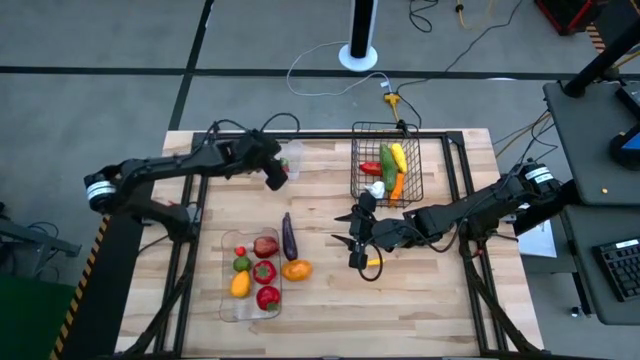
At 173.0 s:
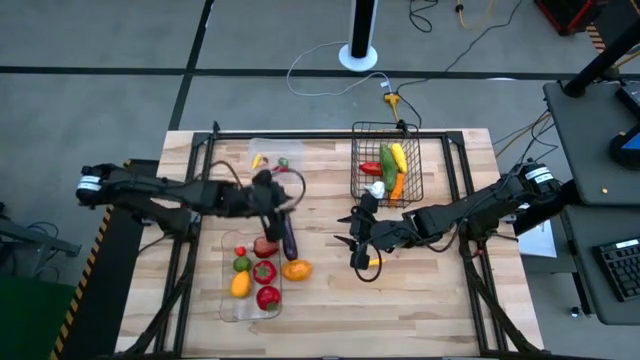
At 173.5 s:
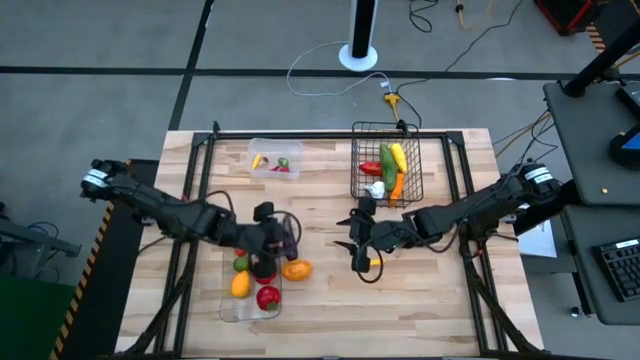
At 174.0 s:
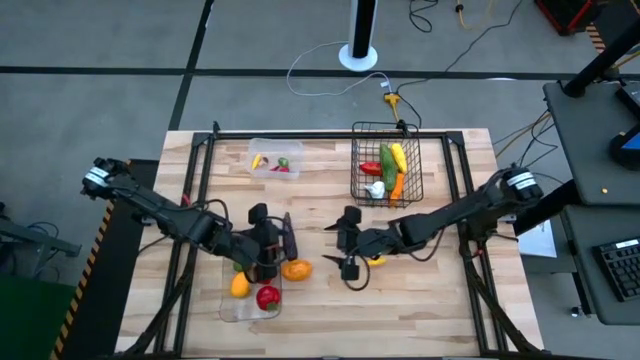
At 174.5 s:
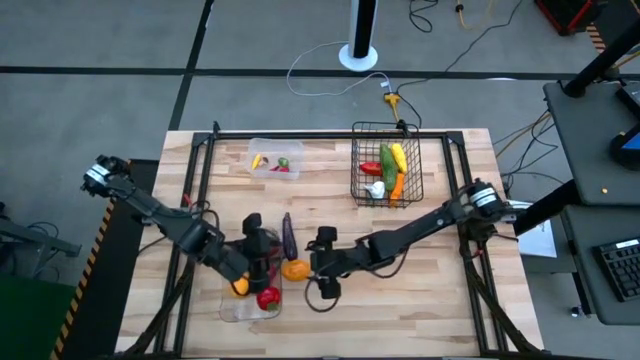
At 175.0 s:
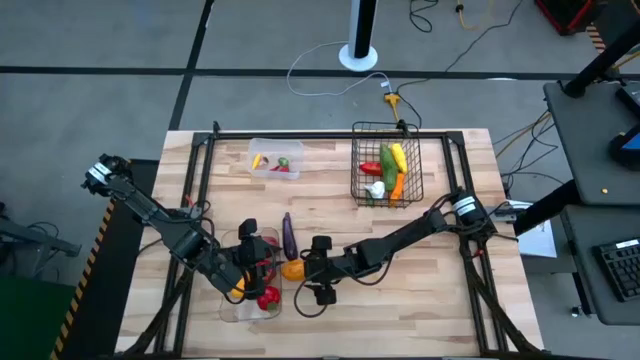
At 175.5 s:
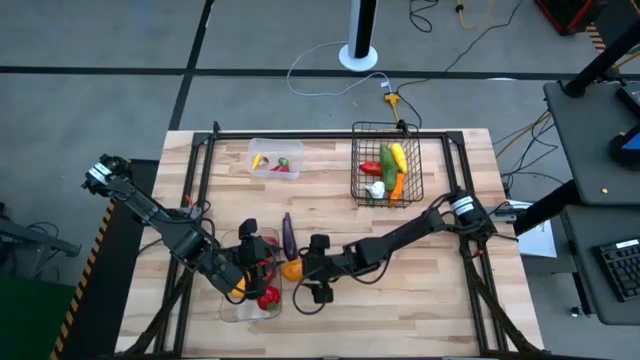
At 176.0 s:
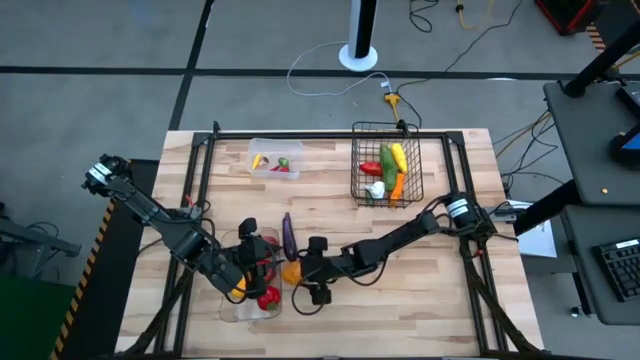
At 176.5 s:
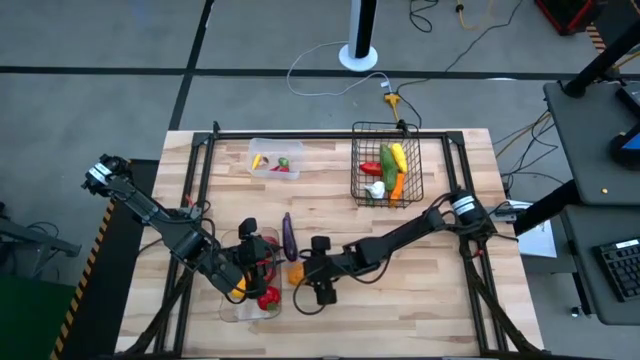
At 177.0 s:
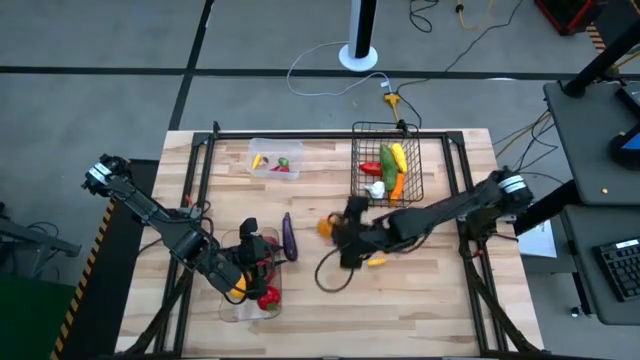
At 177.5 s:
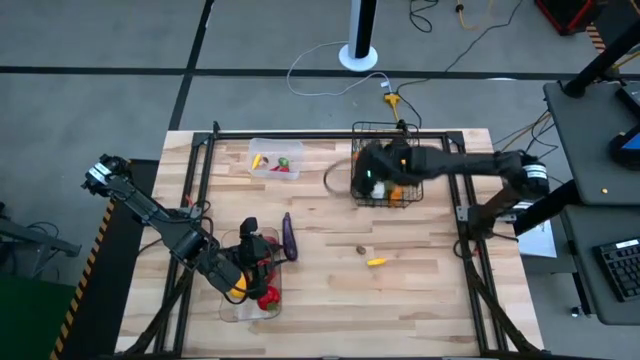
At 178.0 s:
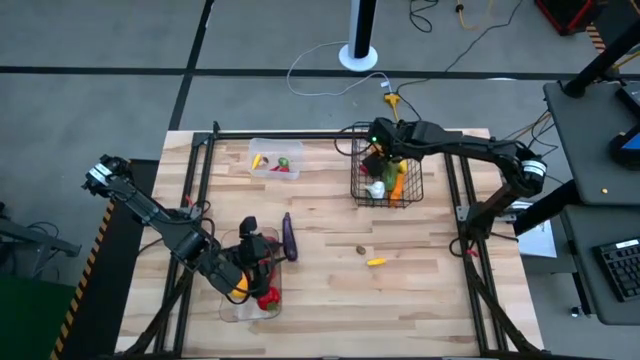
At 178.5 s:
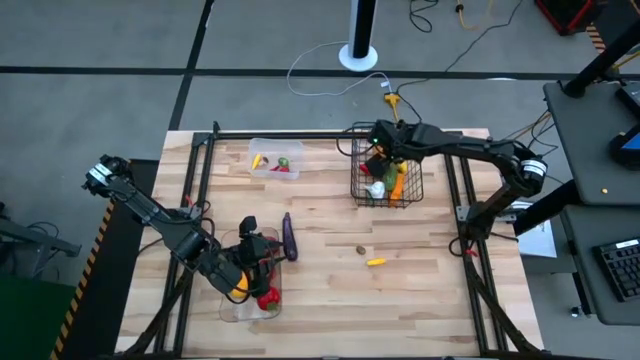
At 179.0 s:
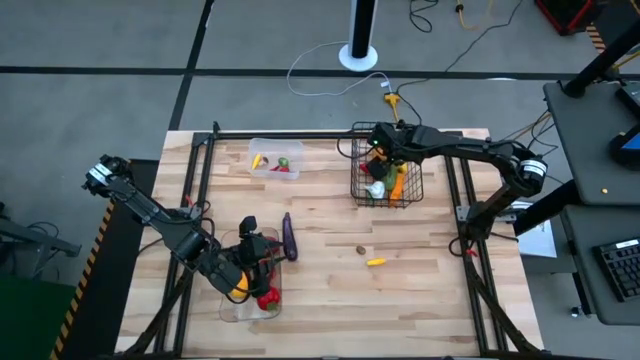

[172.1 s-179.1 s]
Task: Sort produce into baskets
Put the potato into the wire basket

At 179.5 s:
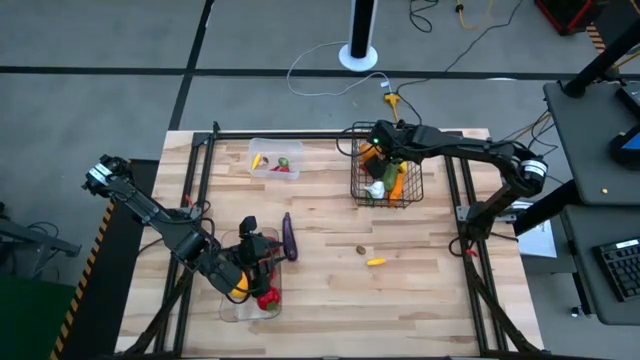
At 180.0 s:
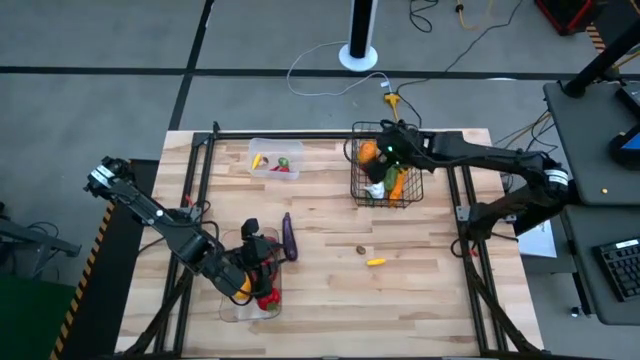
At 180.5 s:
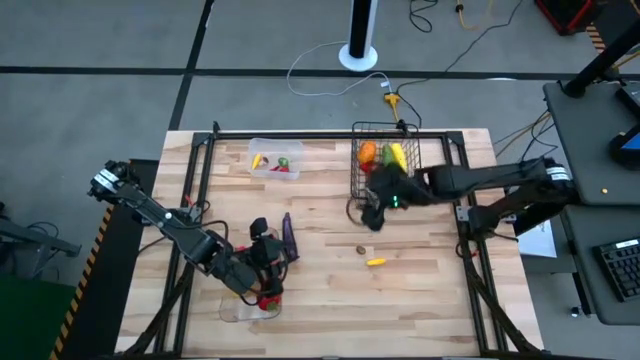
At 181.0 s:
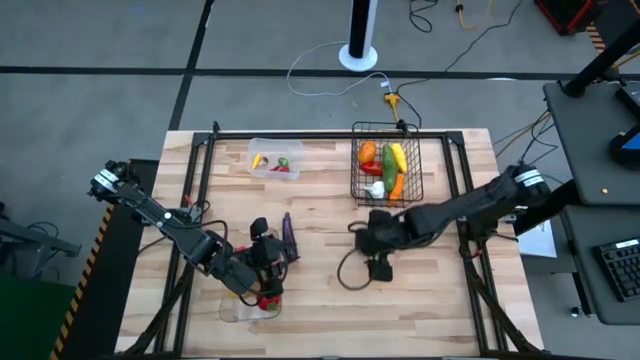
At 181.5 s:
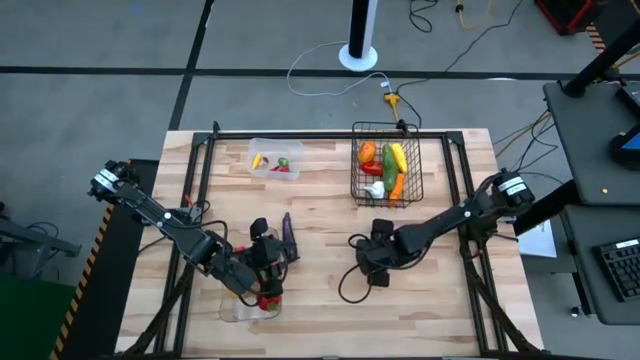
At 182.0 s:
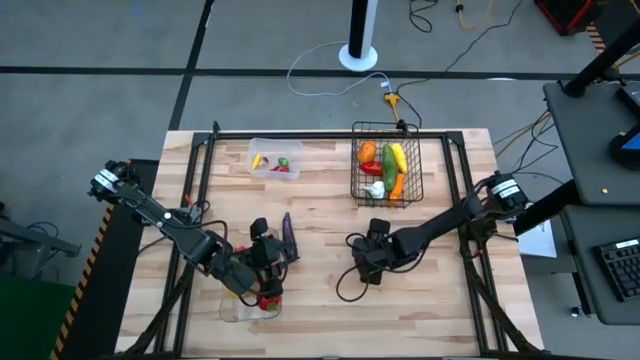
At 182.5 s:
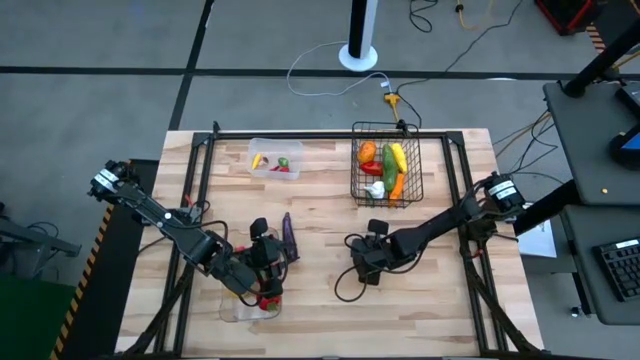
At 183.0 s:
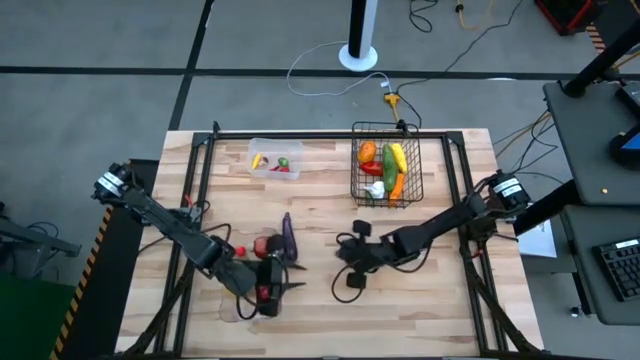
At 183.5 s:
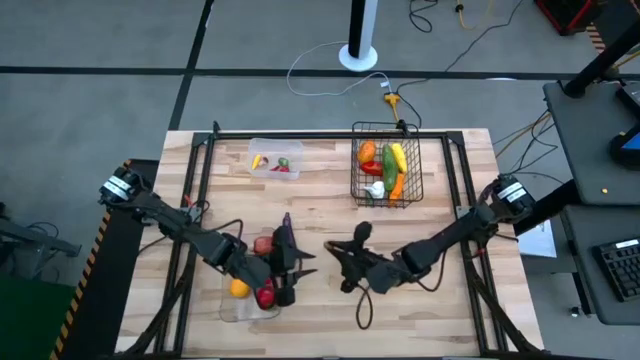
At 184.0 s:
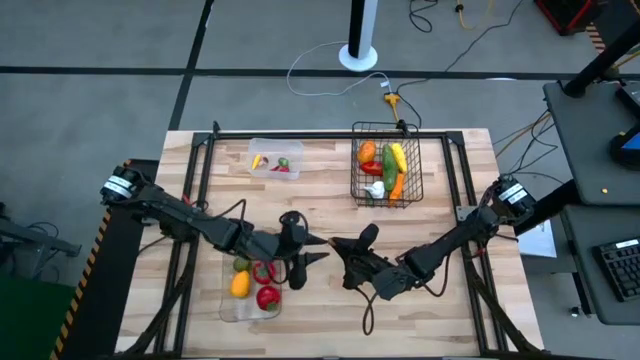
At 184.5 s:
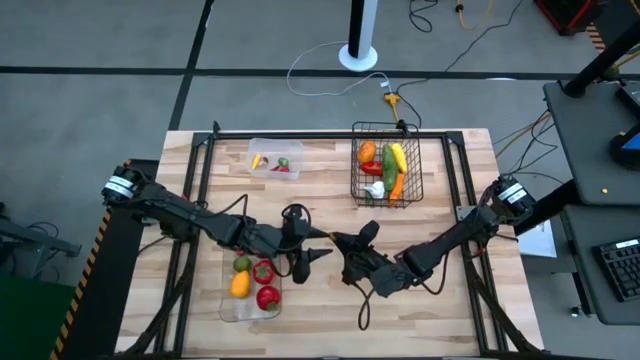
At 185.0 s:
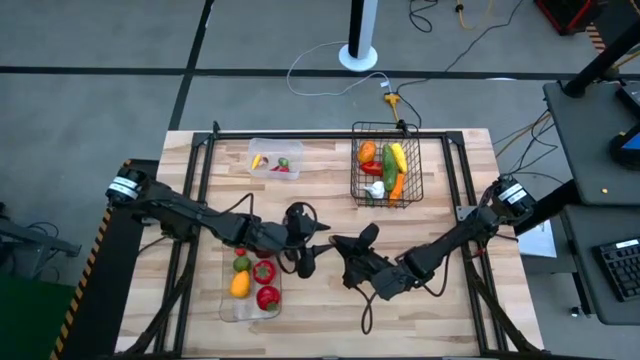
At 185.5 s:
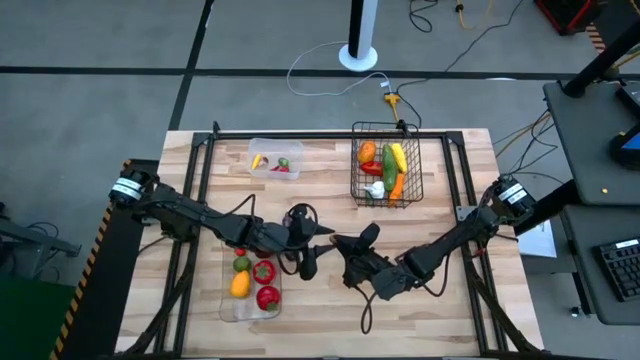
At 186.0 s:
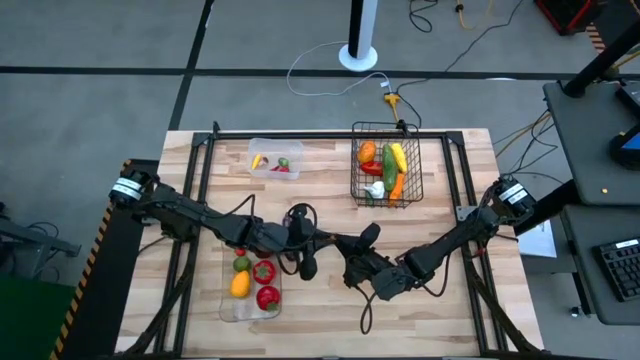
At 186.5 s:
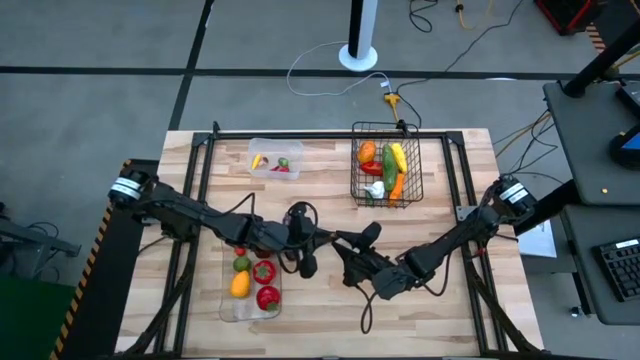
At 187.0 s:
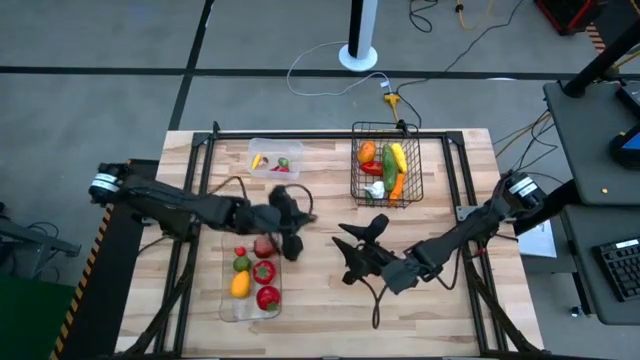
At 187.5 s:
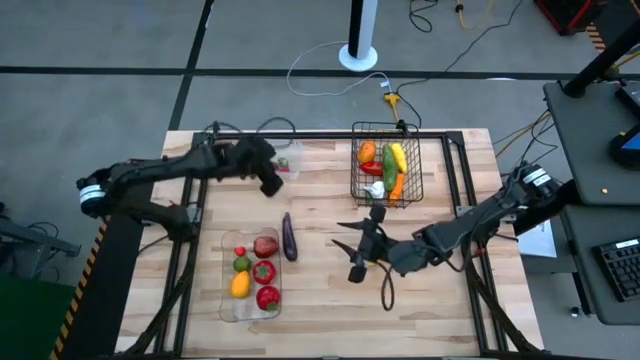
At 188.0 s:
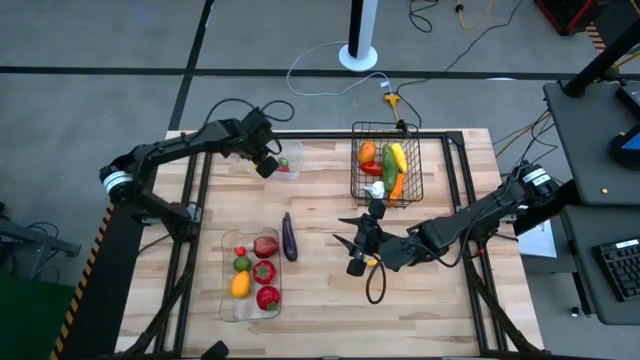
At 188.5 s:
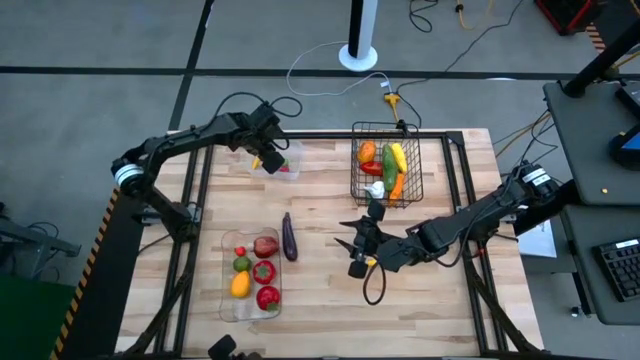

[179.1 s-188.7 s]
Put the date into the wire basket

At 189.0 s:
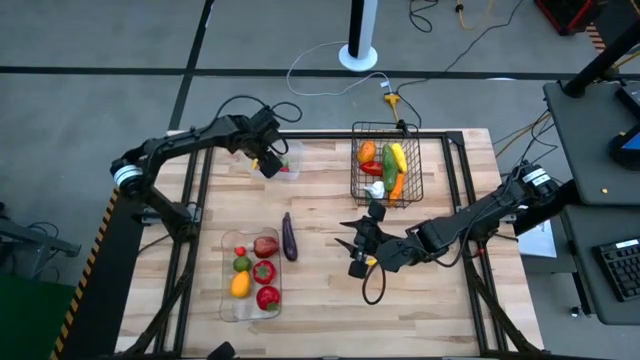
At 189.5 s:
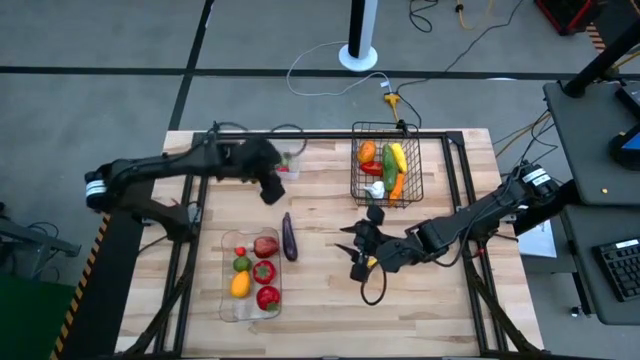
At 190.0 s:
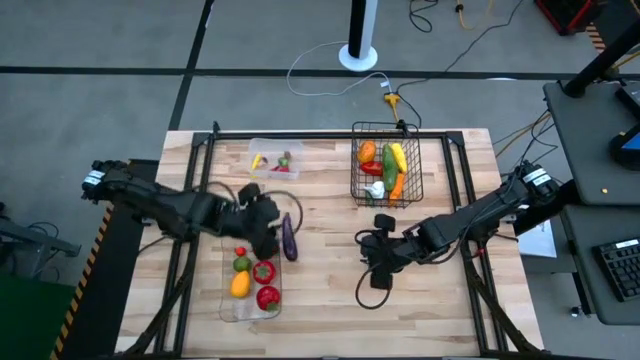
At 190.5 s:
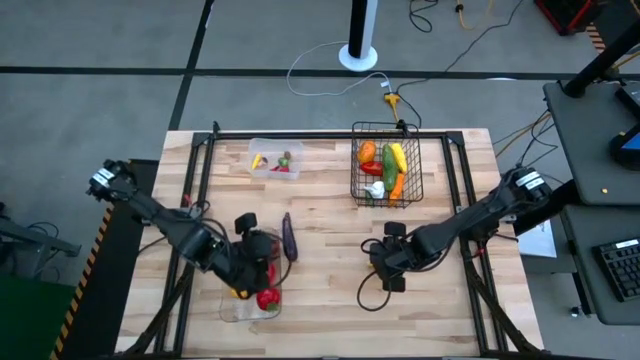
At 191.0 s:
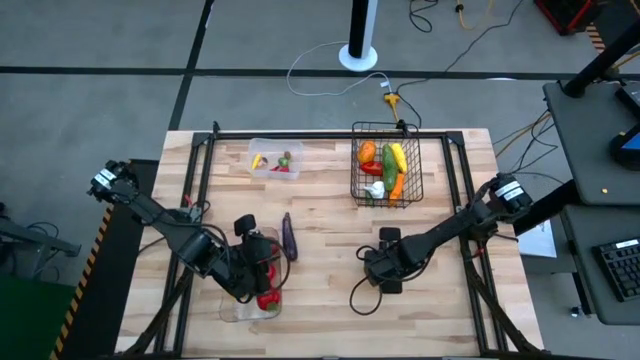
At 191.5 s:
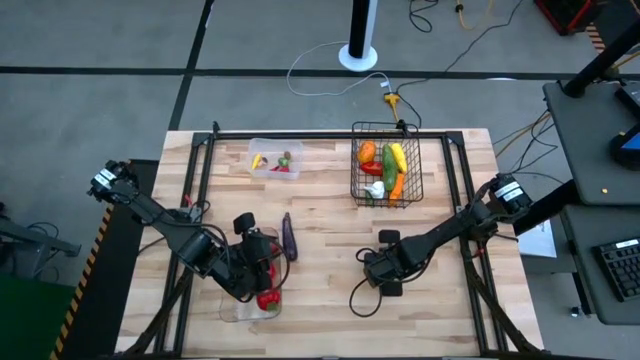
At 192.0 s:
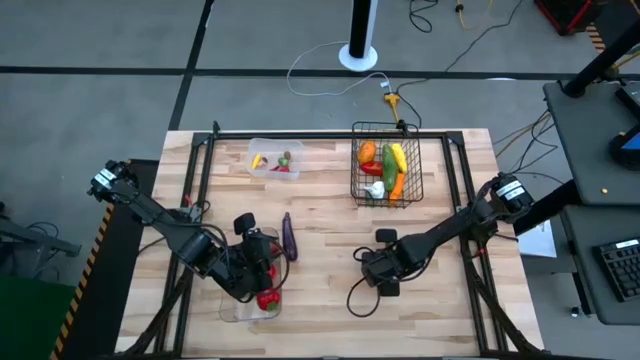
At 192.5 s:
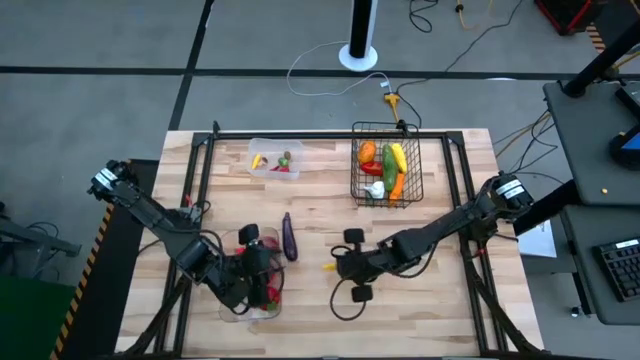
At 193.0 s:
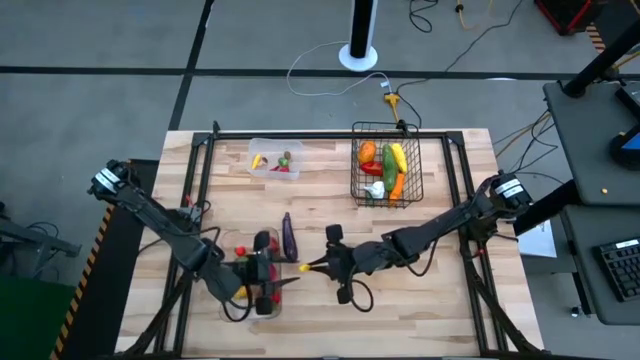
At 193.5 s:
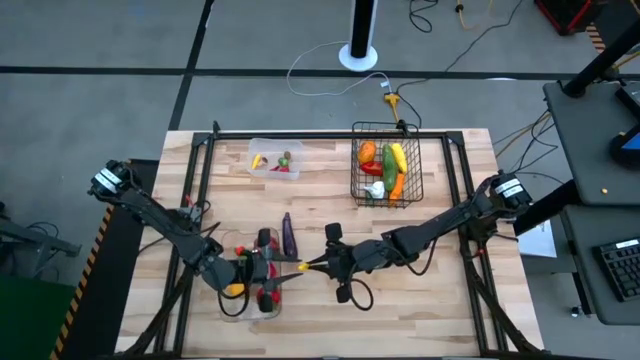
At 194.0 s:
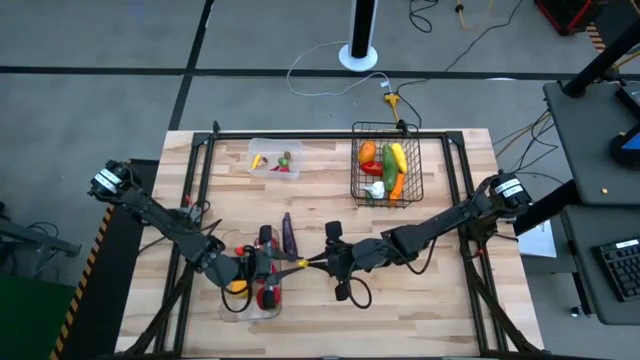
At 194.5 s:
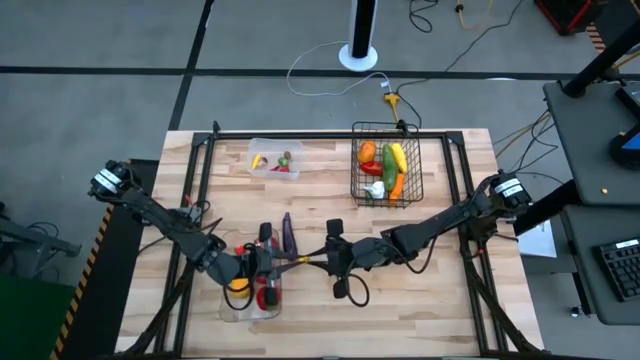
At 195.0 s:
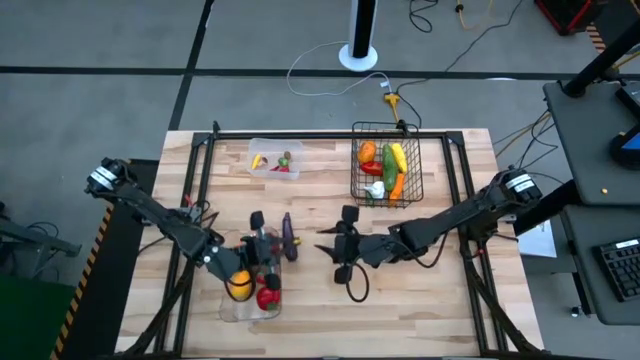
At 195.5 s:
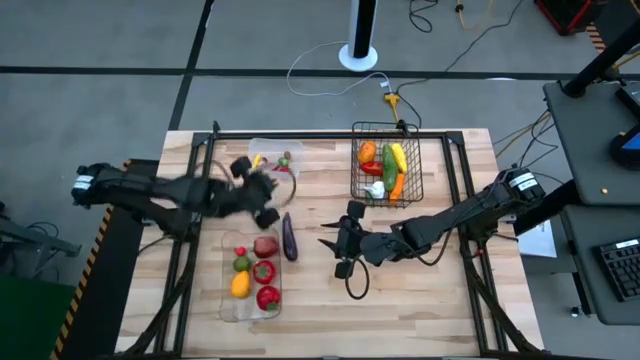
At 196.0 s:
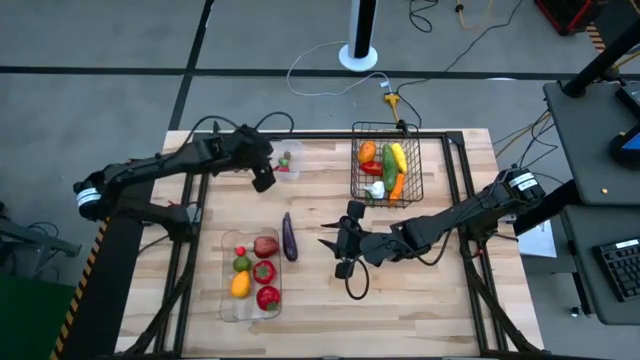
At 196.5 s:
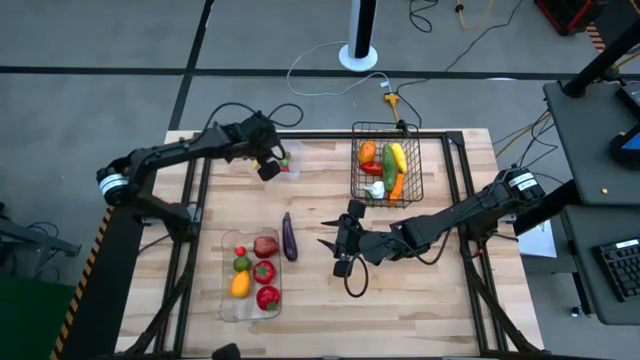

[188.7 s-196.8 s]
Put the yellow baby corn into the white bin
